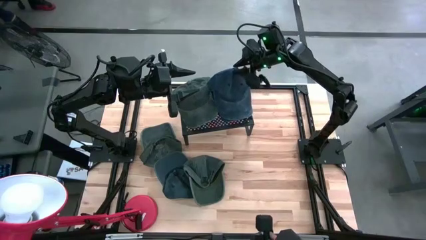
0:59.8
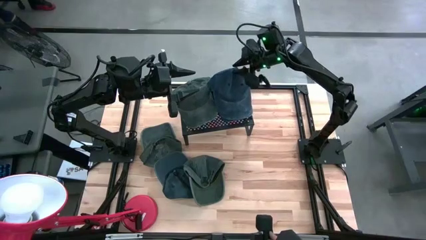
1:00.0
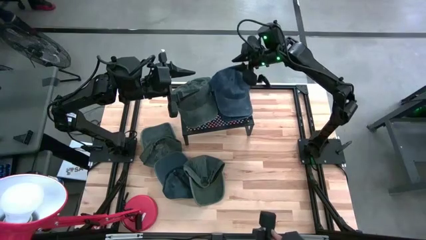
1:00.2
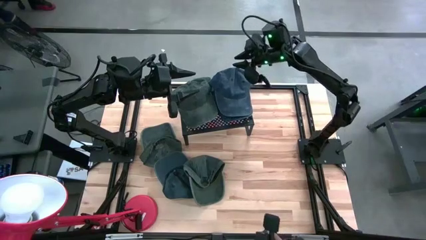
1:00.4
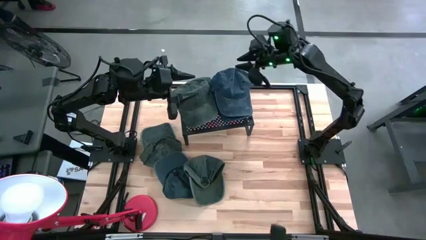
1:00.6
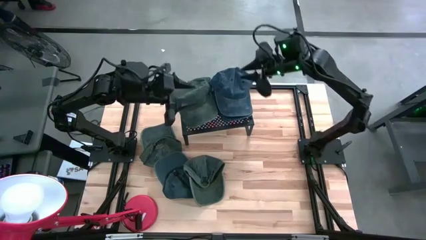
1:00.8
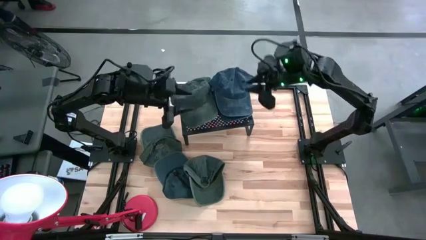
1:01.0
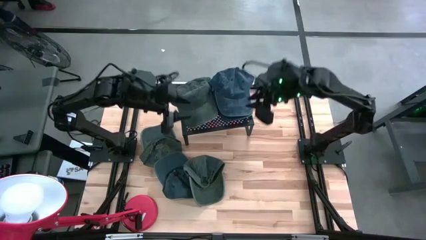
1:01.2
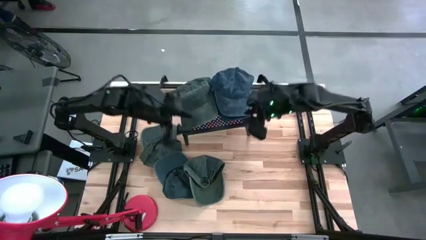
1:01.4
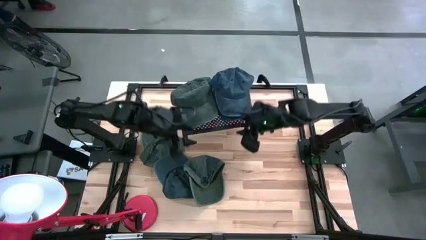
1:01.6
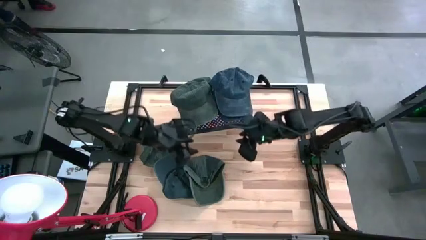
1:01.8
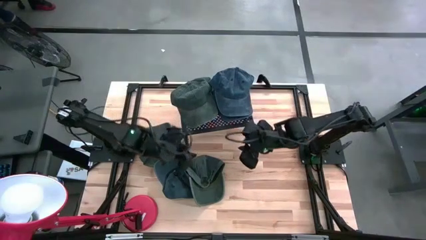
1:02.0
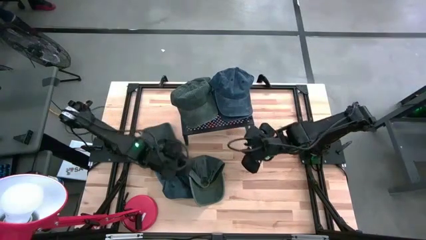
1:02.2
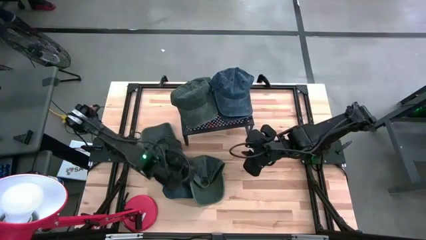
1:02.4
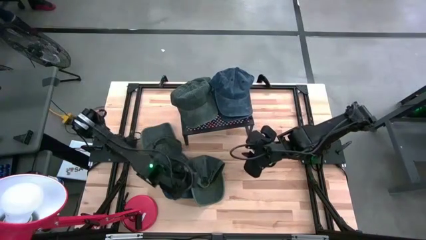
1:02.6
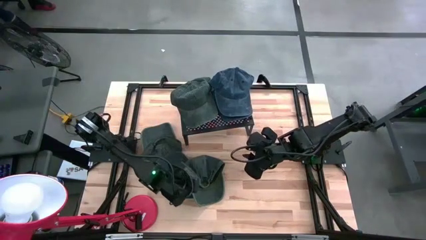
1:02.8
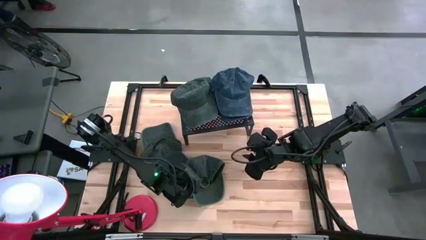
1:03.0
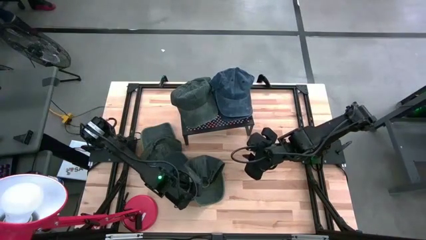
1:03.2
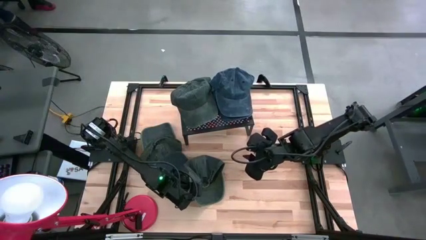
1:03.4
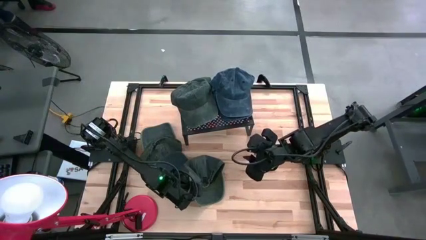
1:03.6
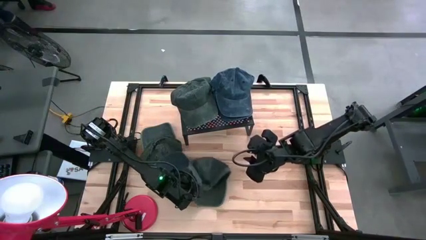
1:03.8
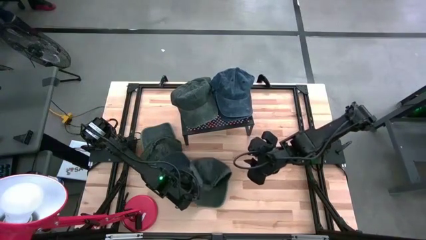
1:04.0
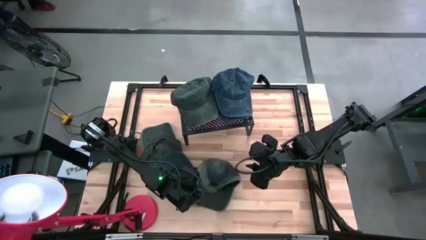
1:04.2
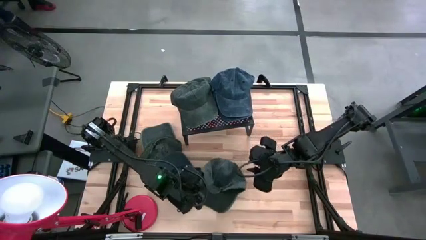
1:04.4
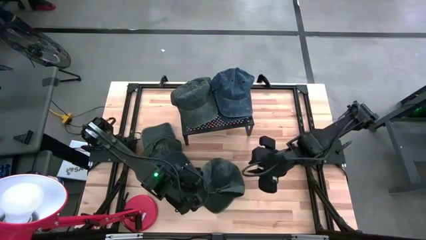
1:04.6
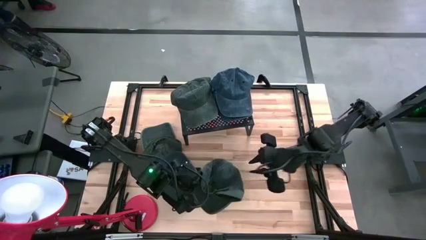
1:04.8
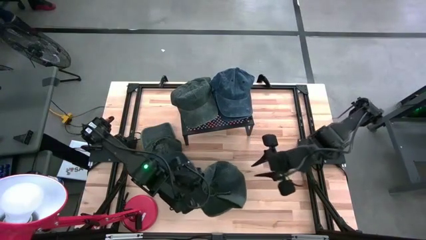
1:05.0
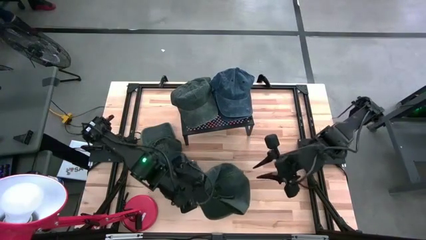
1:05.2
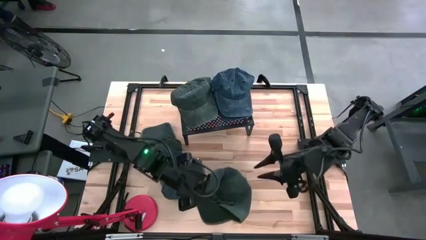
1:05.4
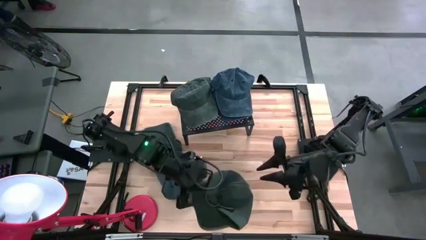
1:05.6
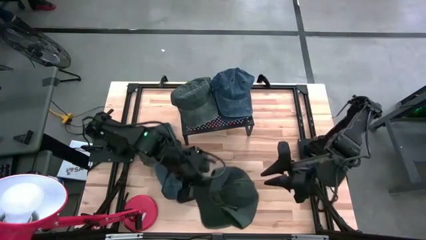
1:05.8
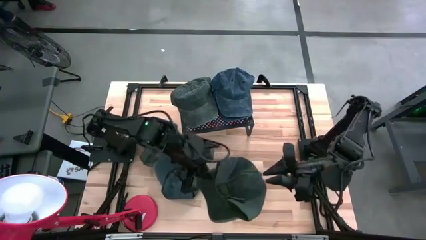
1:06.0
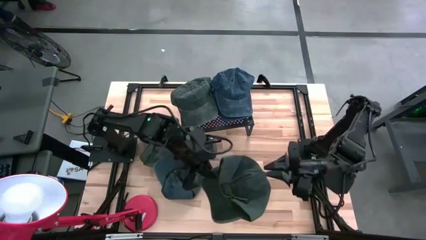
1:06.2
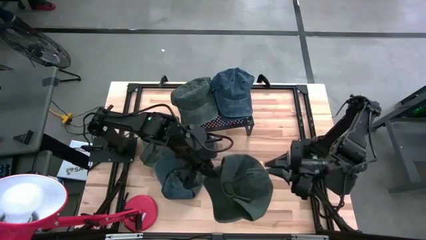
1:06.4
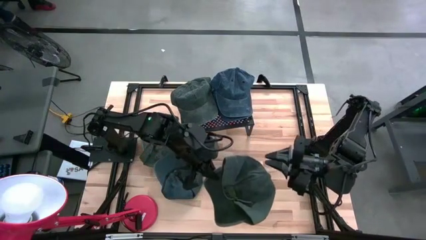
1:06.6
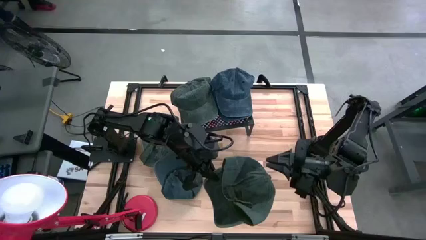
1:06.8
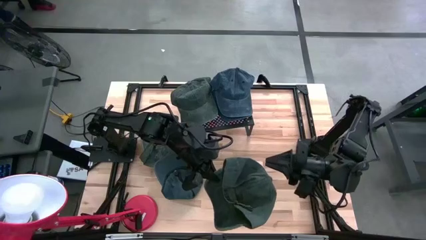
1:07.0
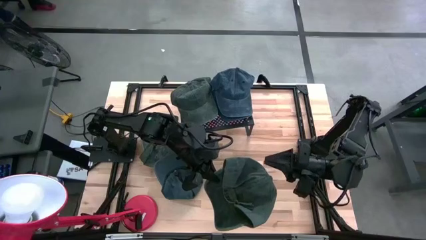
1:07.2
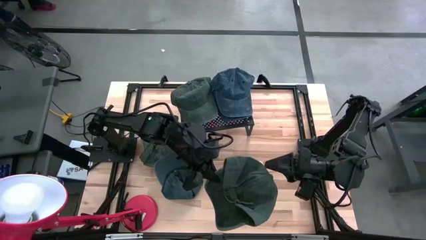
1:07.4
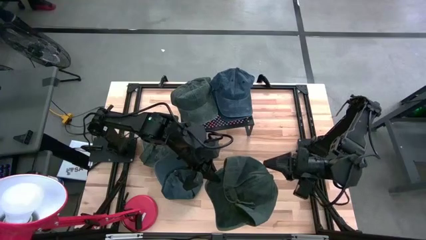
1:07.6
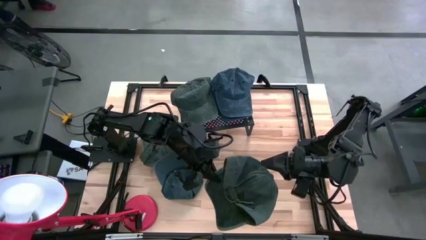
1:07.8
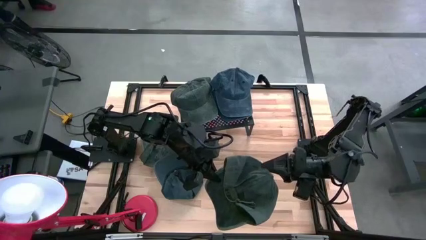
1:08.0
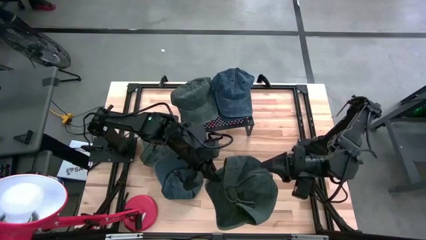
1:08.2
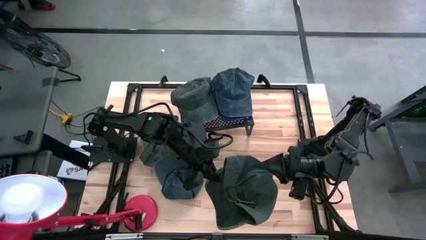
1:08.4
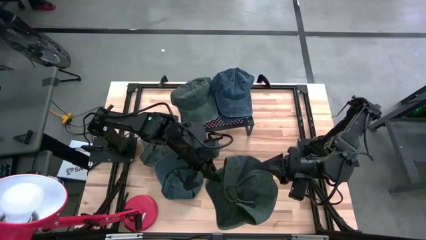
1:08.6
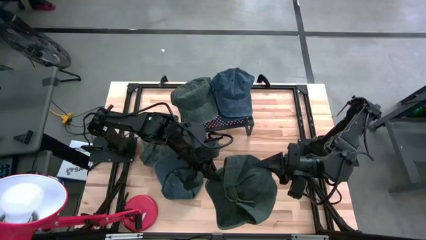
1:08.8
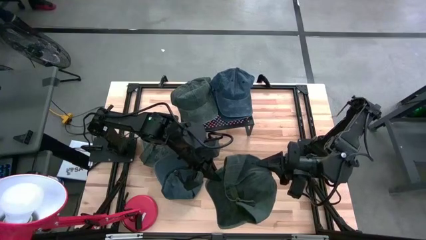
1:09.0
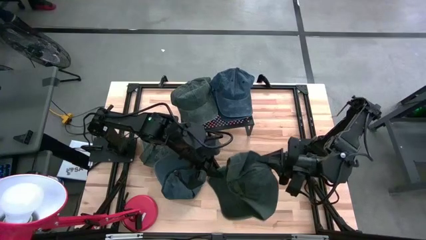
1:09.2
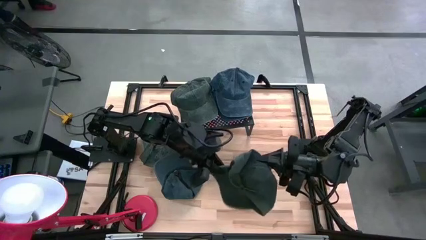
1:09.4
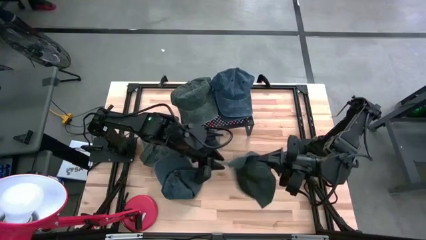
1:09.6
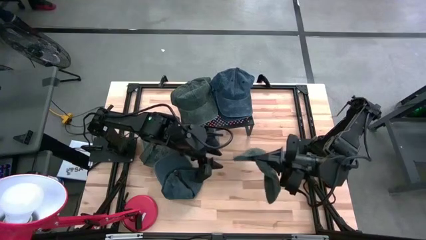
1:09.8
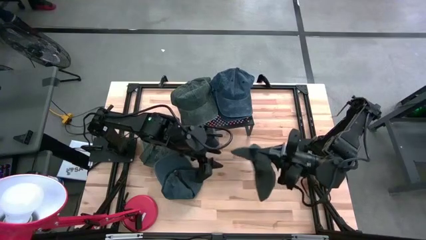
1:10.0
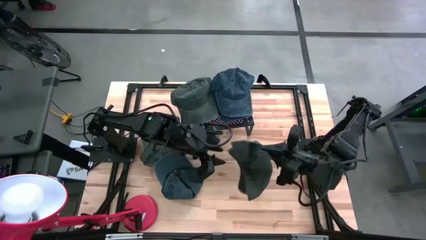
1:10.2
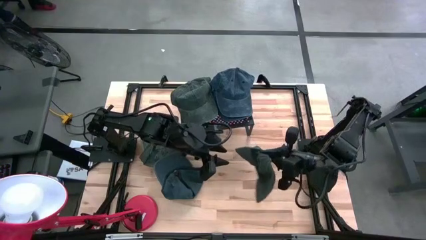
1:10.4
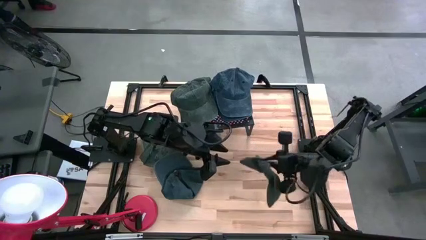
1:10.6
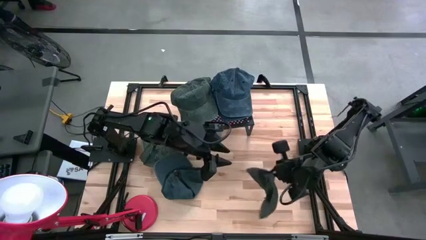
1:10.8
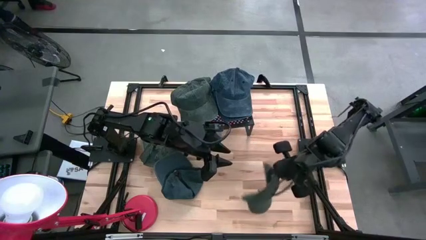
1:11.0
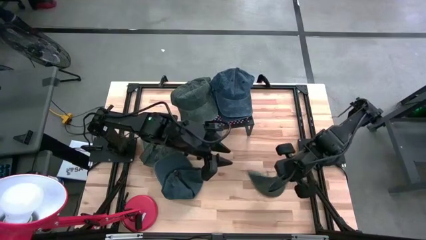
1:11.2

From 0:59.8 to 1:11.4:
Task: Pick & Place hat
Stack the dark green cap on top of the dark green cap on the shelf

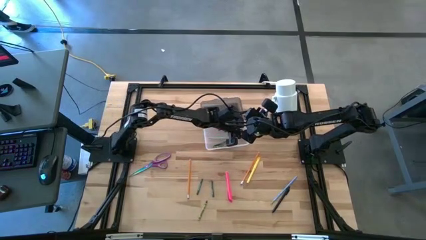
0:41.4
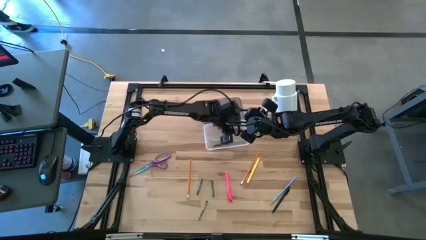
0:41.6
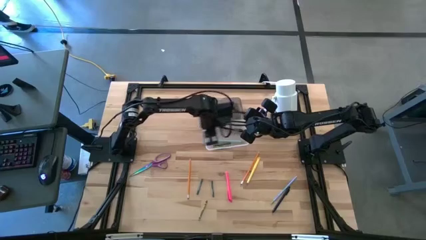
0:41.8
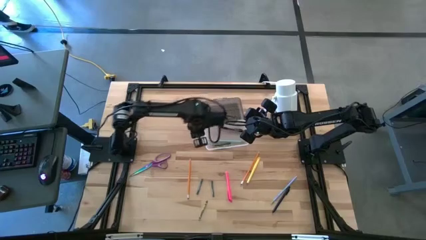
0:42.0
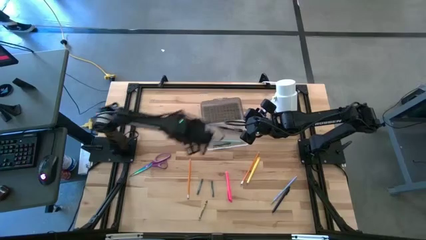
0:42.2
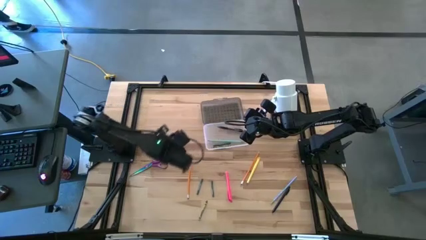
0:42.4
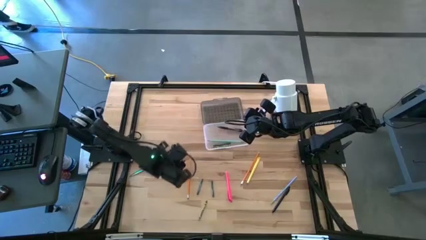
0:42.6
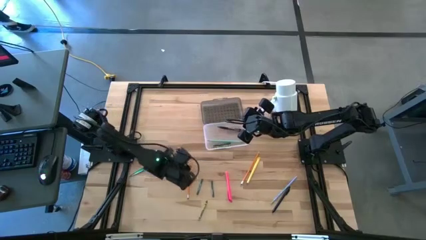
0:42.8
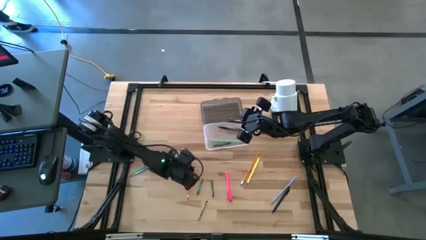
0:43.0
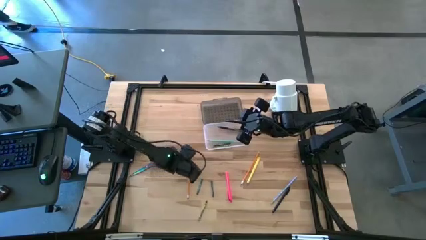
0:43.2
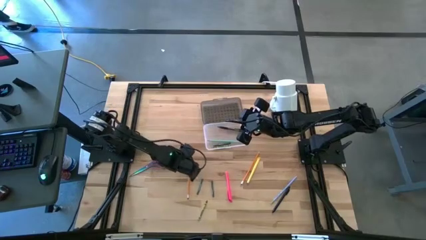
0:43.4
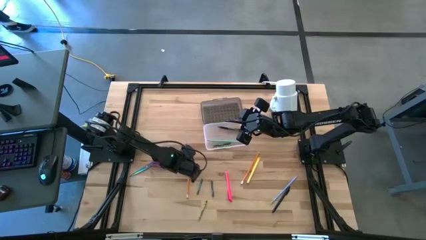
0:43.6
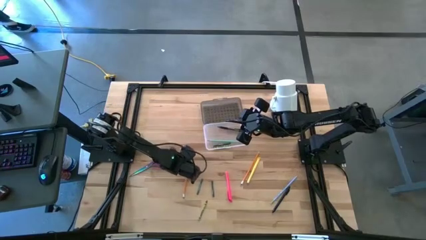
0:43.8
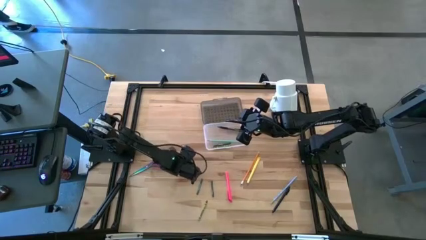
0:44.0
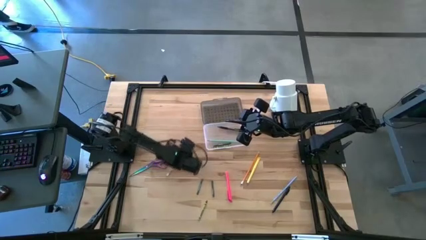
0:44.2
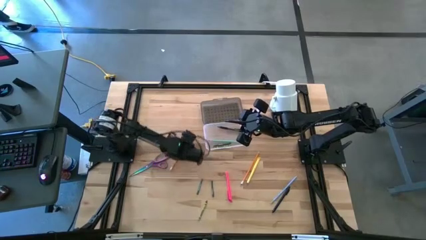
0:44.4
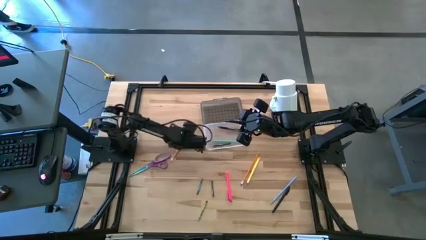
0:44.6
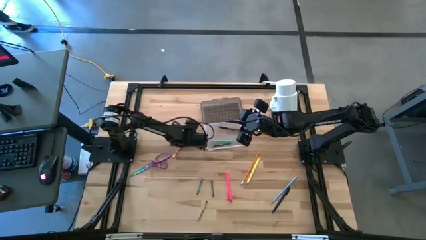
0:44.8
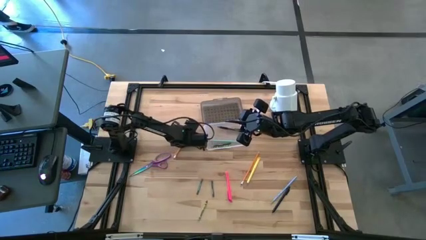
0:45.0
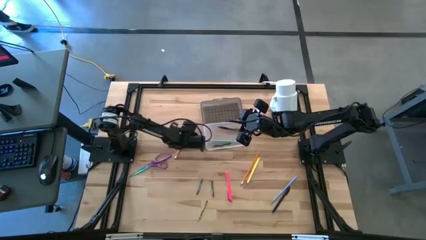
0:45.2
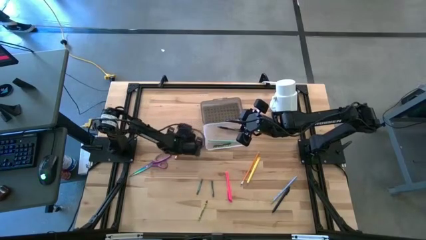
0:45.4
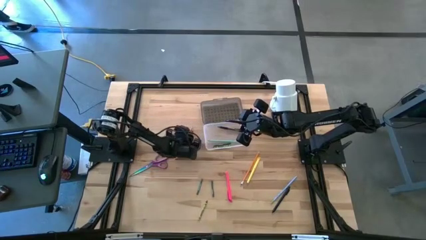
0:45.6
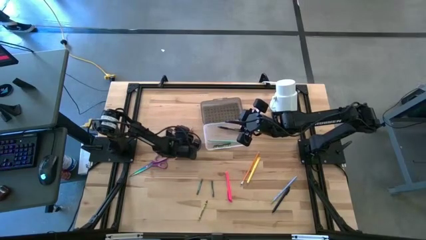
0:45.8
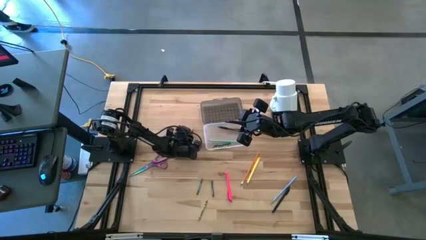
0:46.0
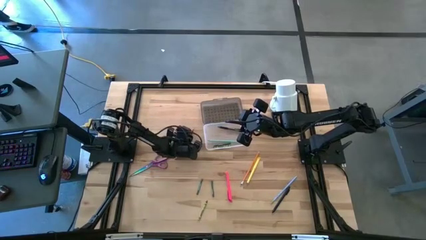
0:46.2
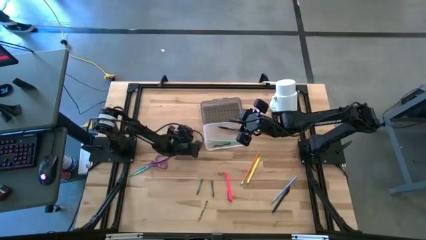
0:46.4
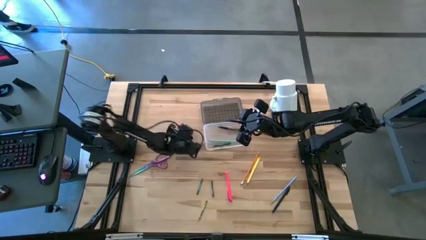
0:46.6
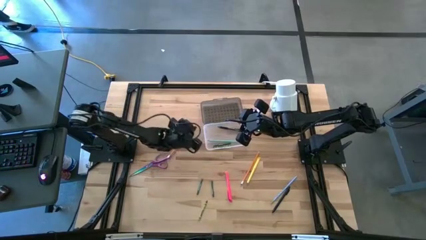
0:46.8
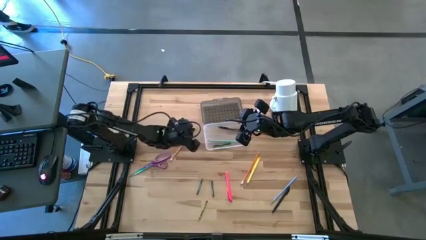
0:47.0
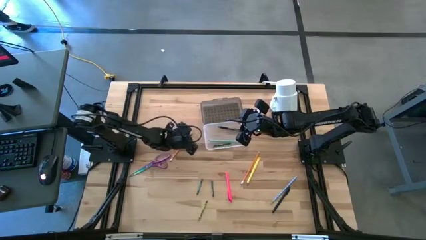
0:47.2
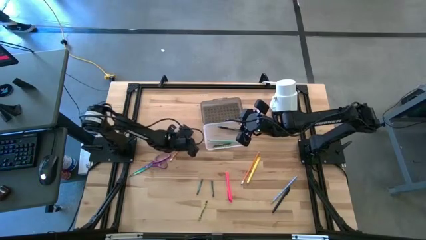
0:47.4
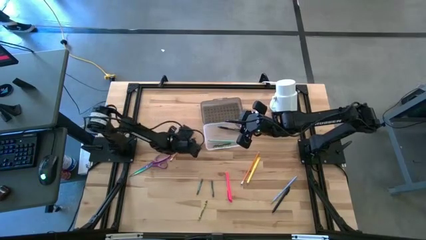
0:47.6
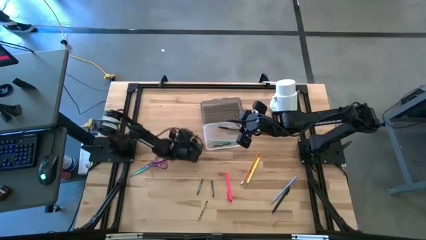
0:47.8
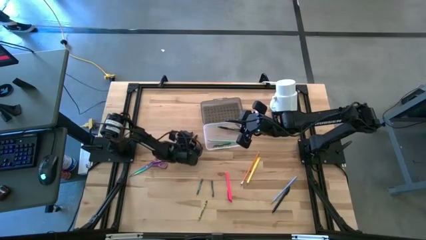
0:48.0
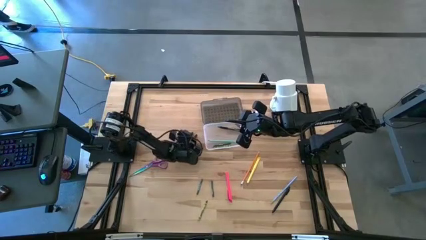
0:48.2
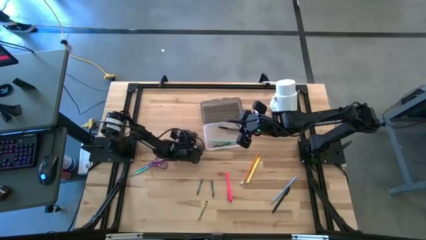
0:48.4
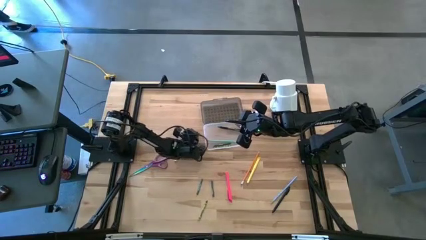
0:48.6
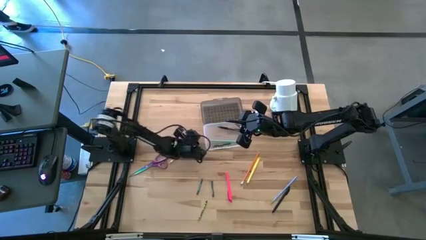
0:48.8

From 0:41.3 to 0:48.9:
Task: Pick & place school supplies into a supply box
Put the left orange pencil into the gray supply box
